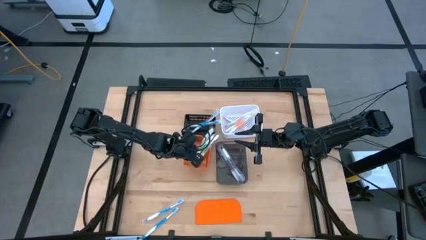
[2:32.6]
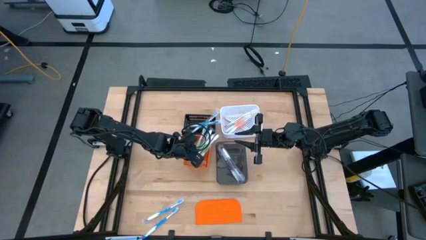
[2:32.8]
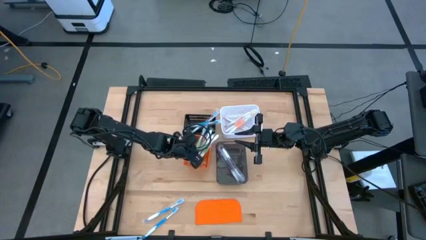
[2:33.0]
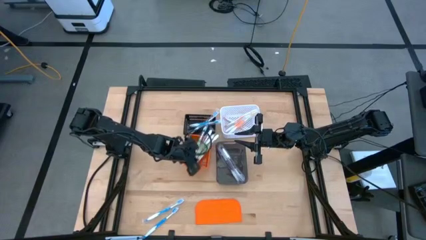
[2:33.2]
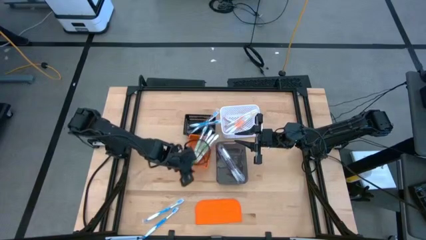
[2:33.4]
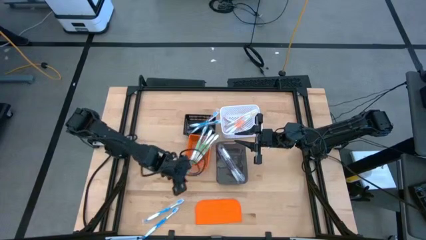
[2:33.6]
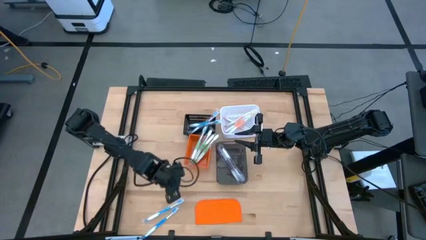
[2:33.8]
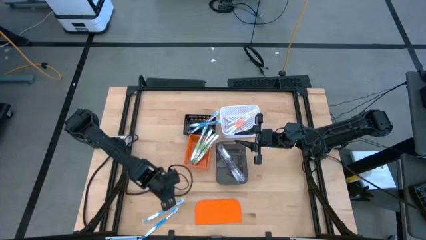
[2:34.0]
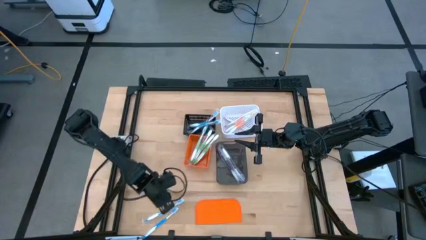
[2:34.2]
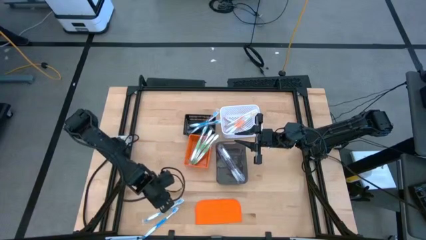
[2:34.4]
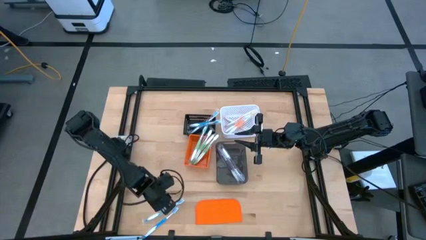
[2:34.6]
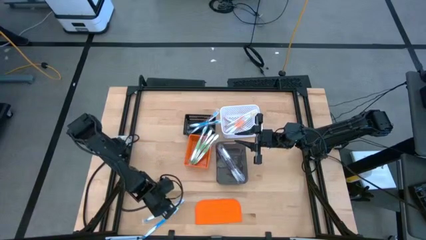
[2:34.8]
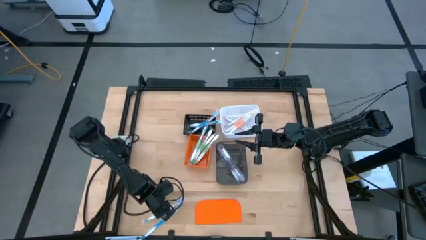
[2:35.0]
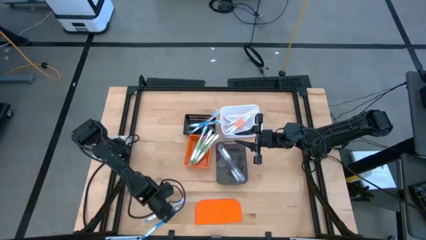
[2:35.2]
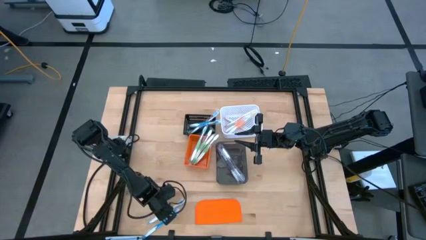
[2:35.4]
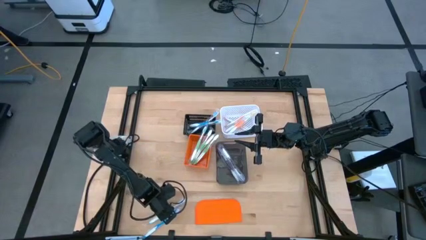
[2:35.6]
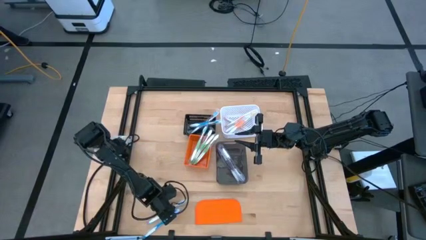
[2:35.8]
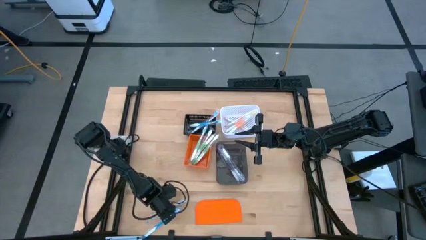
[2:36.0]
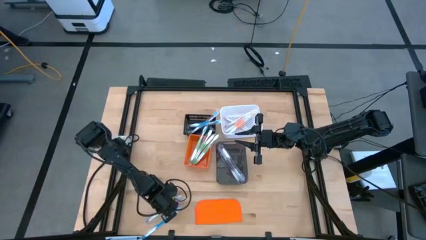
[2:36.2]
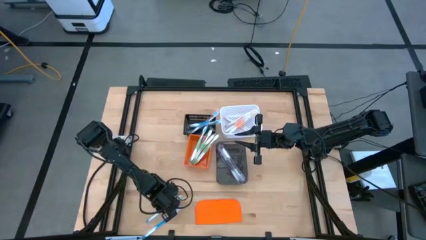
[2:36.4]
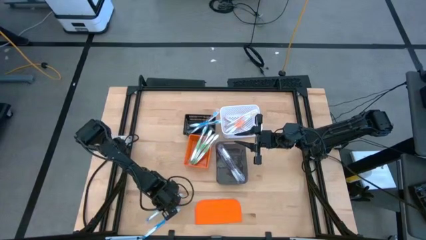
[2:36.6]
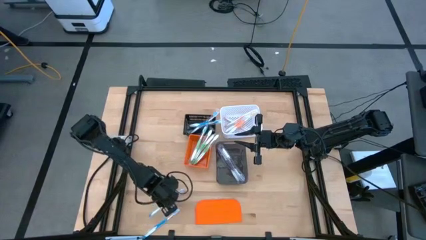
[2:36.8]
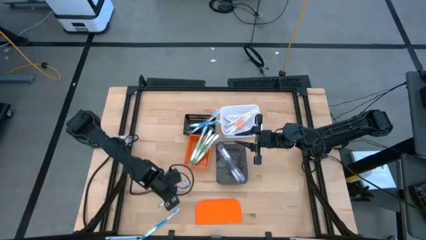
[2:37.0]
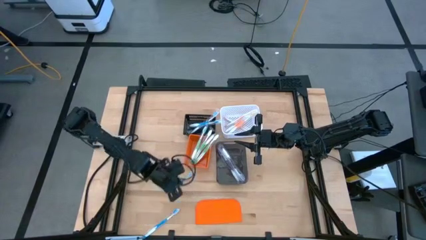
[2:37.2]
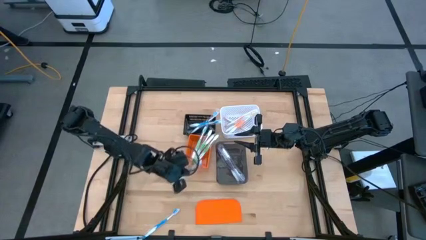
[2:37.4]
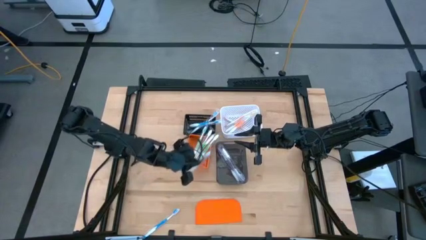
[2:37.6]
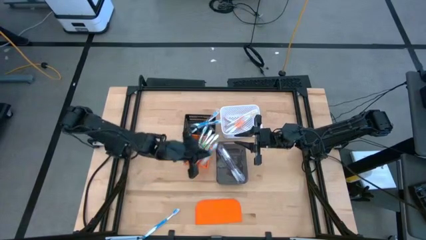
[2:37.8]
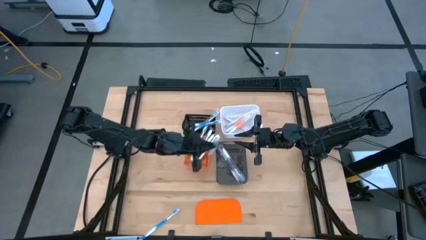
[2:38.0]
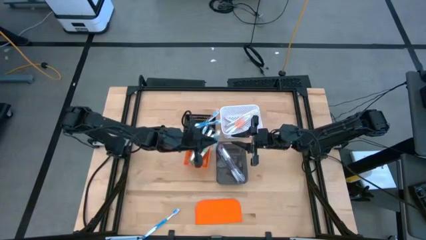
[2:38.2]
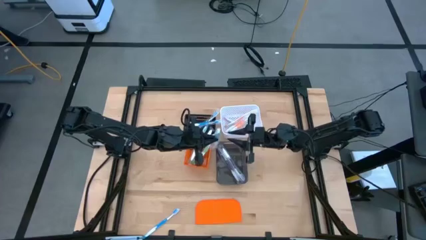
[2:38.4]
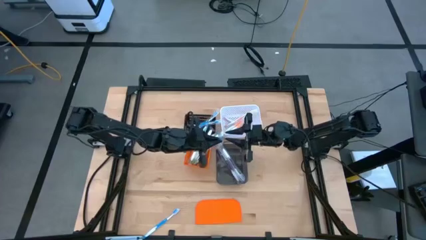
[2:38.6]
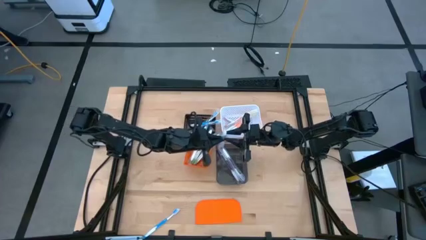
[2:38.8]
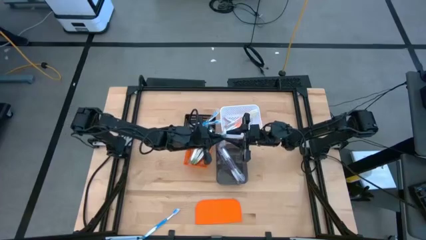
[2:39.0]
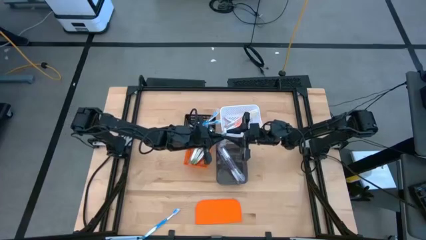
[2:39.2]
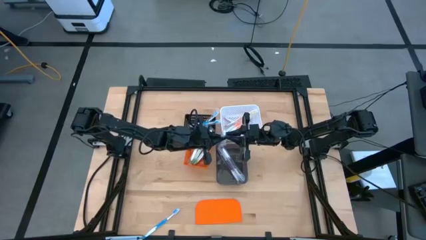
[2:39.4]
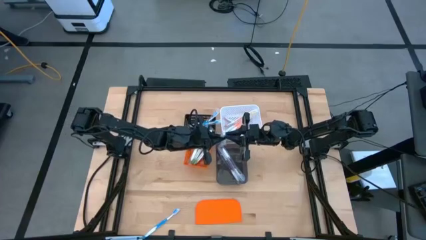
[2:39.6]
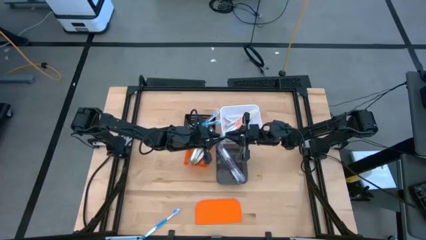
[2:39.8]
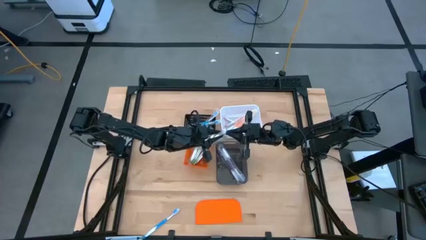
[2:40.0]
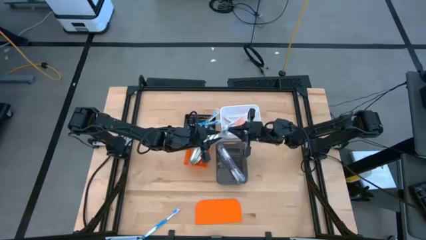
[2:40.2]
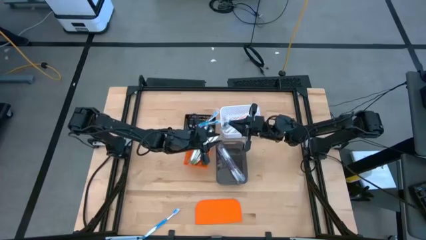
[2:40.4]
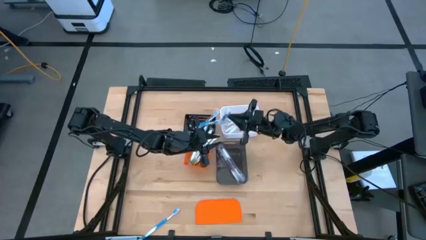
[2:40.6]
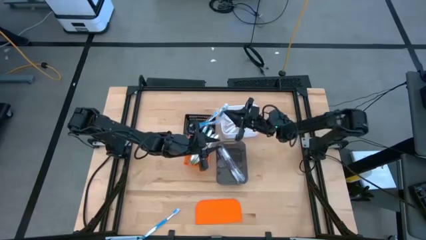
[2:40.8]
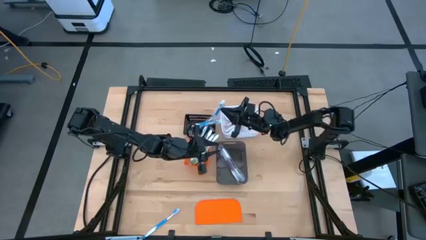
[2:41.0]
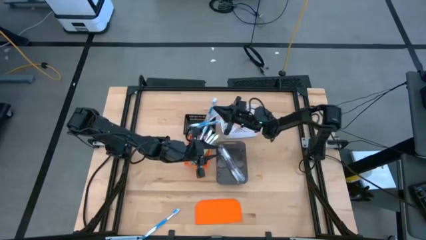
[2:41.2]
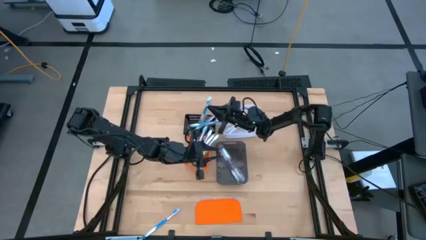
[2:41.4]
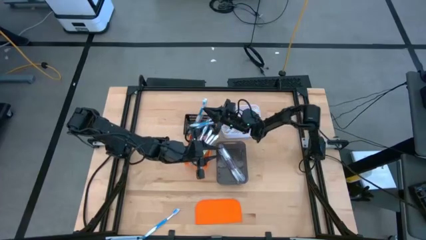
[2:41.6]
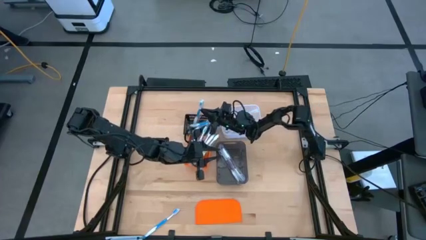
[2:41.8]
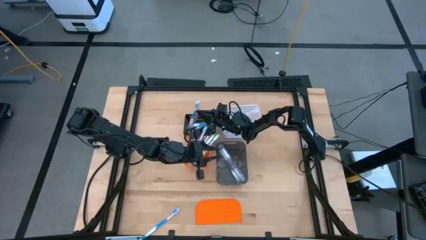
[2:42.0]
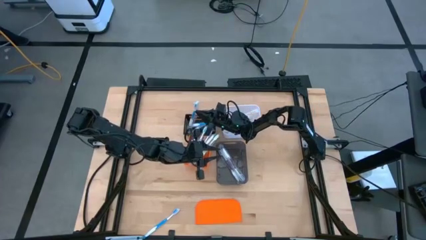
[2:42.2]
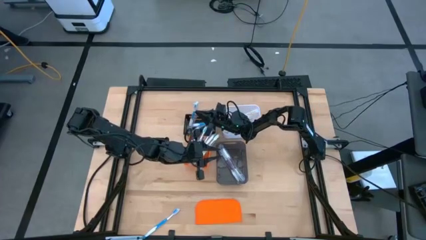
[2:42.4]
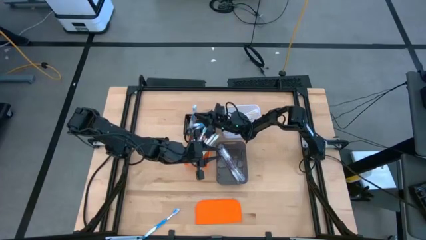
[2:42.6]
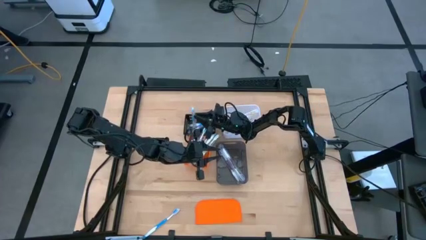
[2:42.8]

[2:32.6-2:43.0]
Task: Pick & Place Toothbrushes
Put the blue toothbrush into the black bin

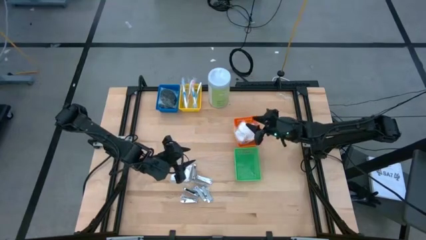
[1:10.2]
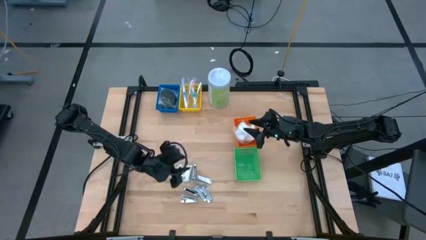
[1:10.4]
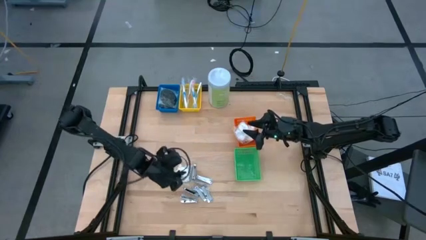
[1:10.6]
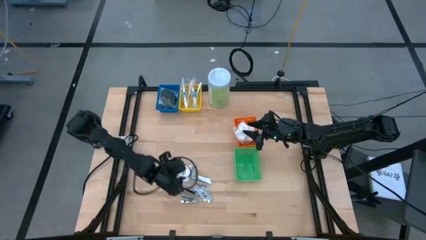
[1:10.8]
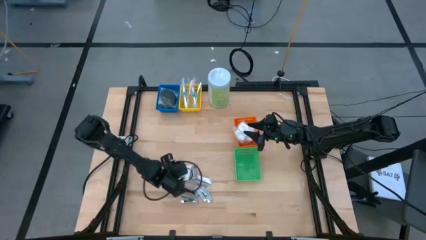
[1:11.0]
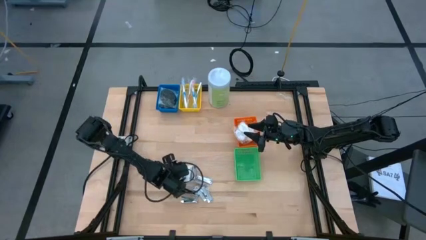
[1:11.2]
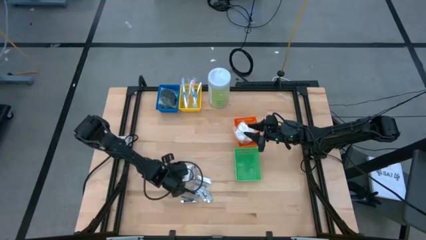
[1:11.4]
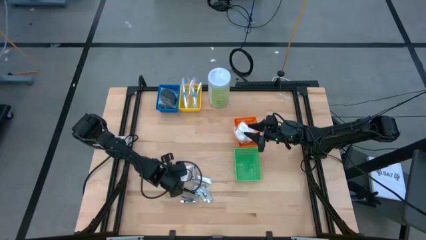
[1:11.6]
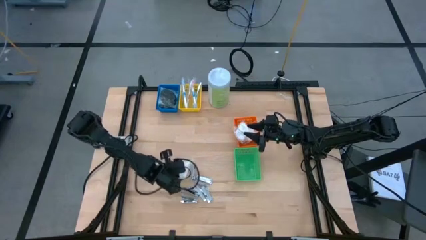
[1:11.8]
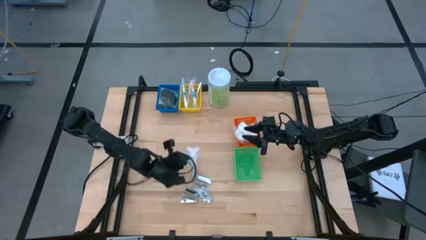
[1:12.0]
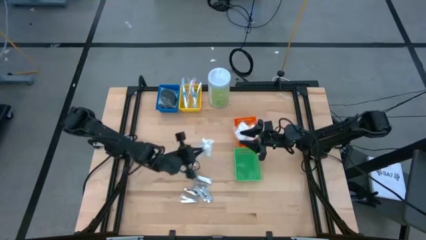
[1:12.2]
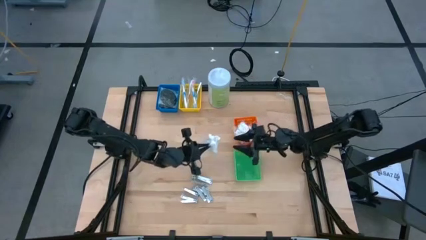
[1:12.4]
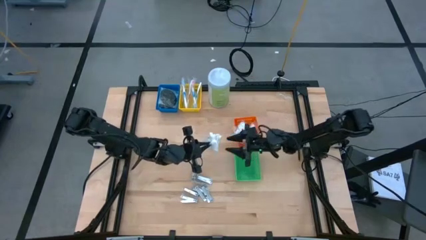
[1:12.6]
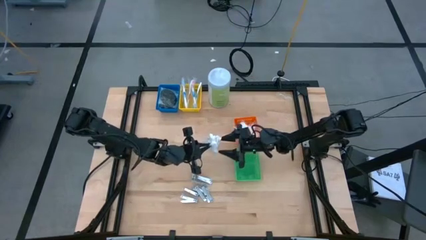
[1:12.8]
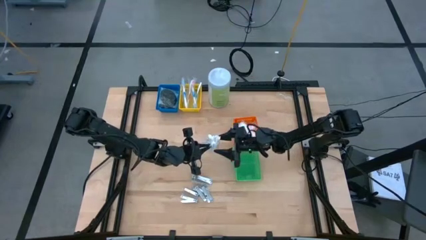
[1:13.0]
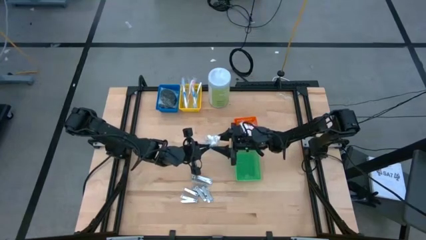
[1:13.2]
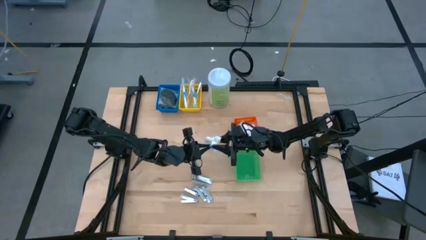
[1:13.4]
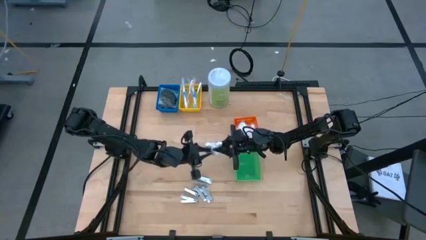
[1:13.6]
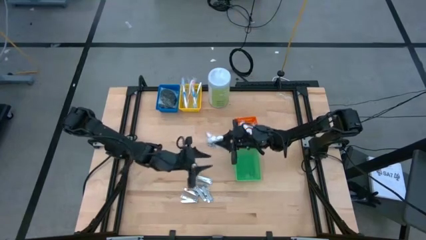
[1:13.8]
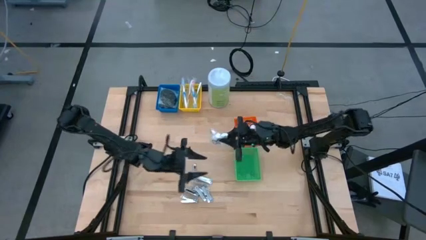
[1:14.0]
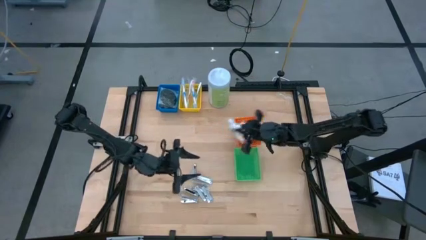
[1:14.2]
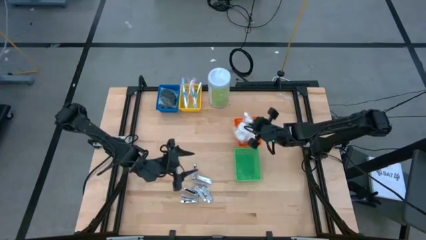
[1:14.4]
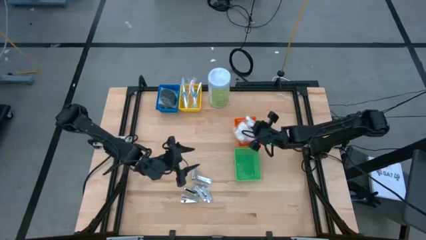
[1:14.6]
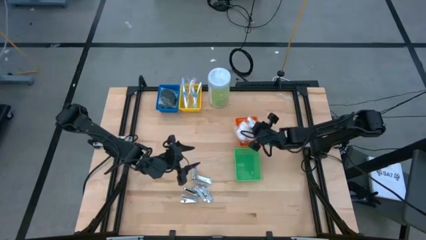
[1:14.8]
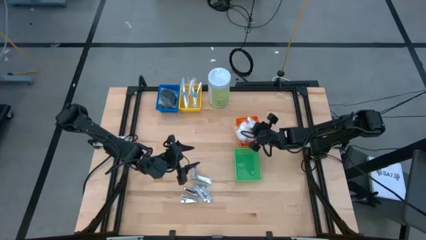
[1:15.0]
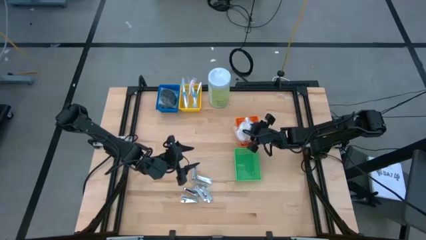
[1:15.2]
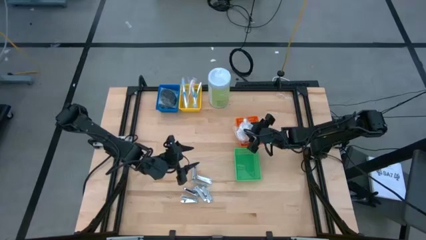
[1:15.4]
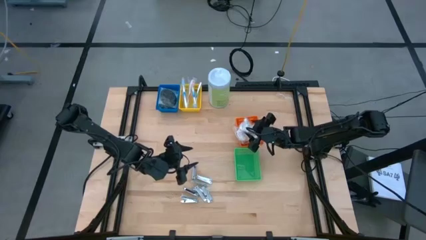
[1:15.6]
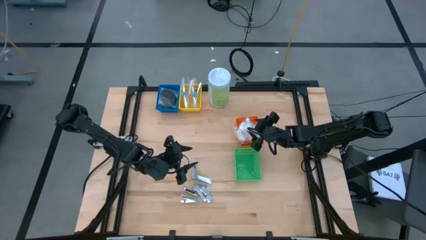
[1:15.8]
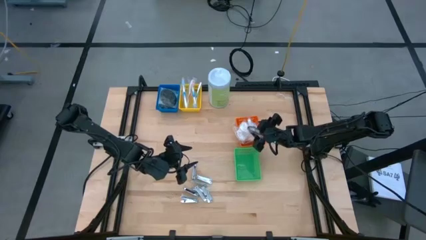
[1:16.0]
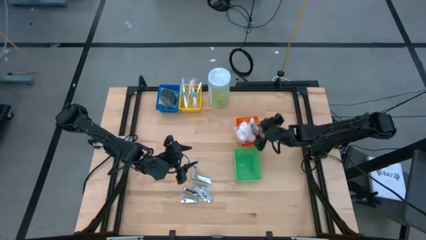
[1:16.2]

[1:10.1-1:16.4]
Task: Pick & Place Travel size toiletries
Put the cotton pack into the orange bin
